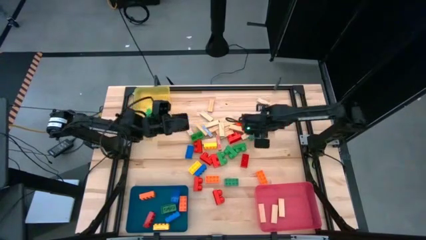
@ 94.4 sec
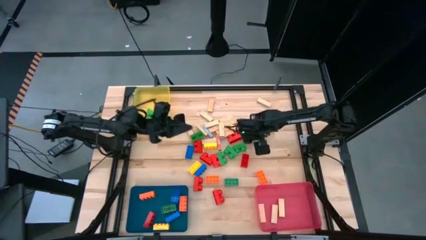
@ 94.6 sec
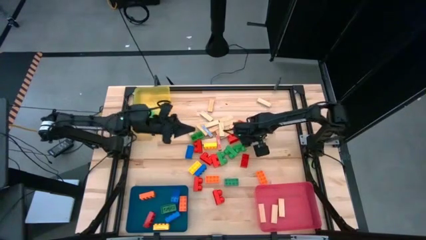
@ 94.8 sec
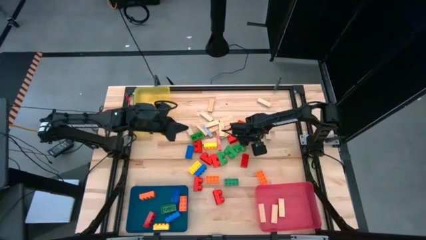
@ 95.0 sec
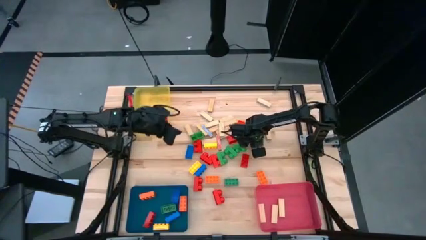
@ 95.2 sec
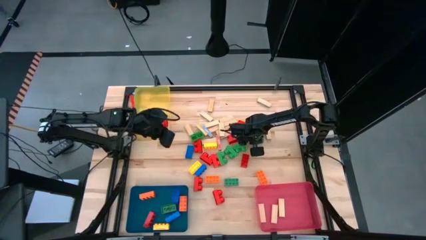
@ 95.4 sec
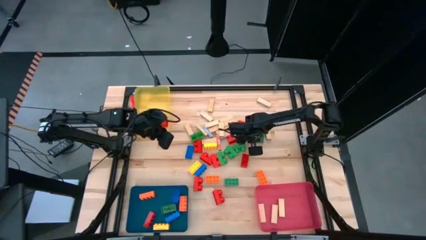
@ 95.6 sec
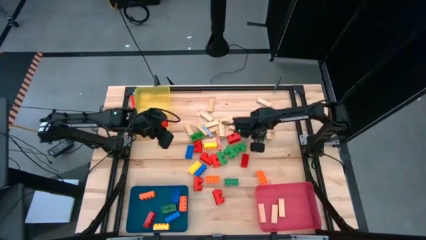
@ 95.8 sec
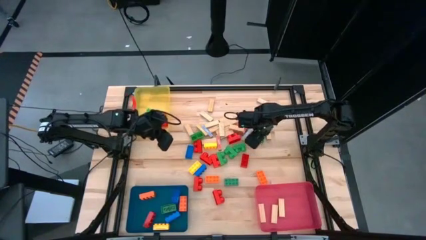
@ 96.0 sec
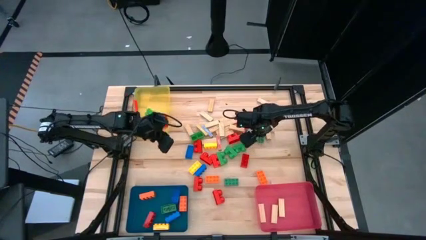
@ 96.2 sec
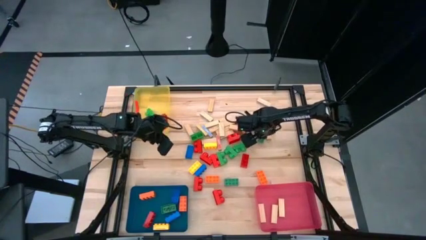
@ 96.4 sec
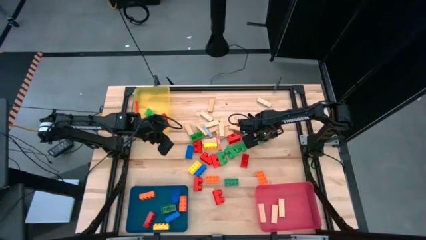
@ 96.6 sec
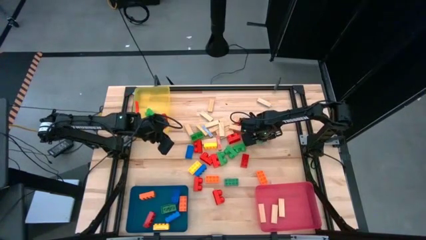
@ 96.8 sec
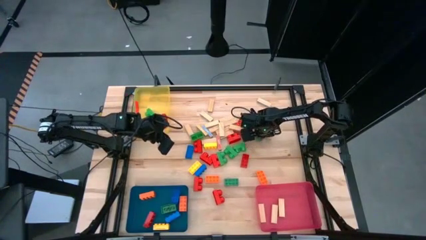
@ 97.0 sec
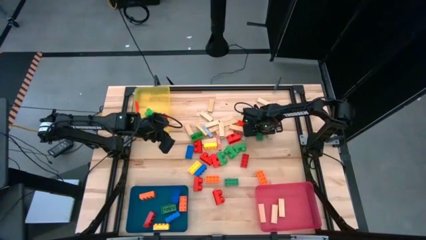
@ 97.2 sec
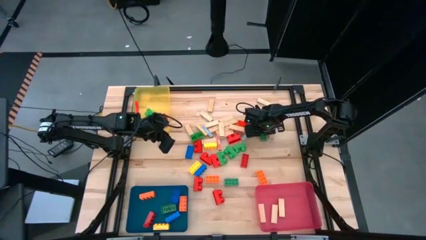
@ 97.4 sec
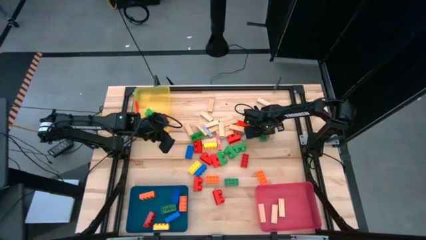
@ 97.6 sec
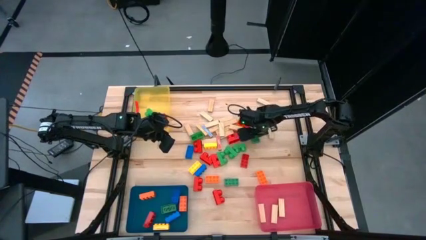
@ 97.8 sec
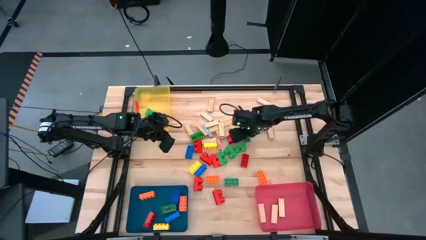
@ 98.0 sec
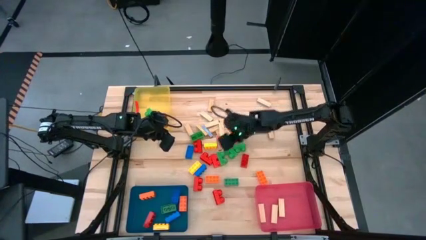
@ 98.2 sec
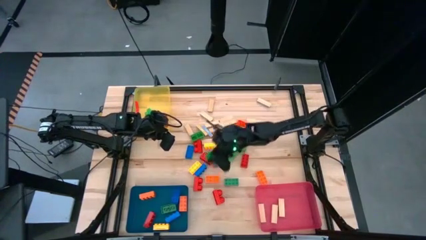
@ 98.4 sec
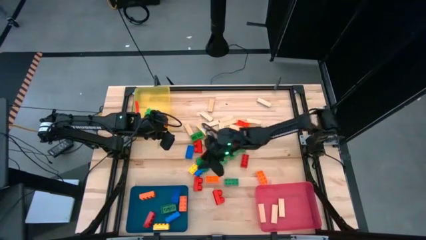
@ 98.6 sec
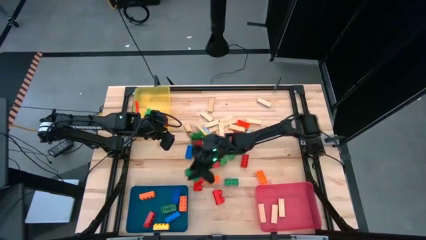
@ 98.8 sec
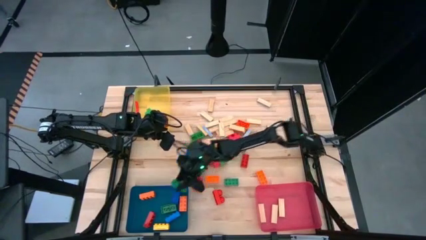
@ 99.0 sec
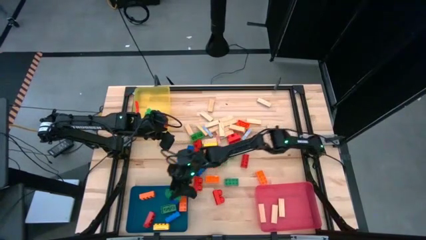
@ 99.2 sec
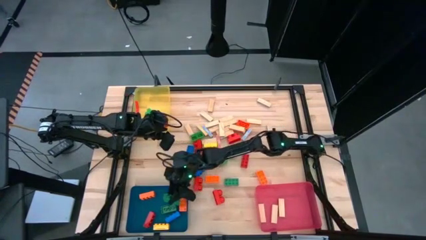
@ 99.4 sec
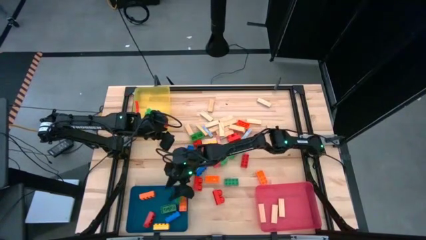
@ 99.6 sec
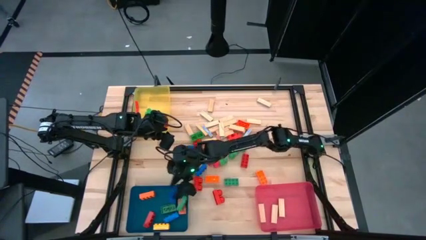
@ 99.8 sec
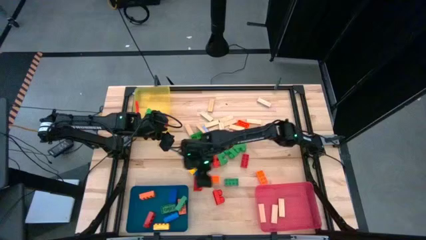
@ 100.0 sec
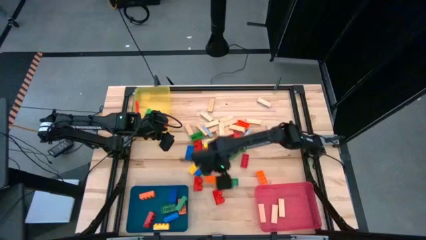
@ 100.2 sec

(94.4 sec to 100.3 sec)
Task: Sort blocks by size
Put the green game piece into the blue bin

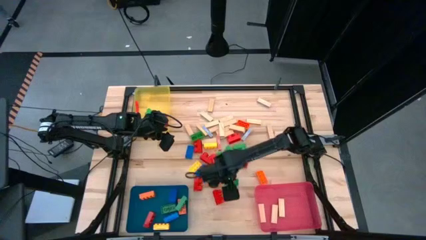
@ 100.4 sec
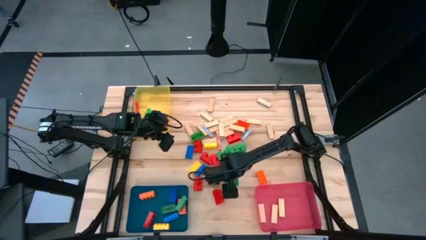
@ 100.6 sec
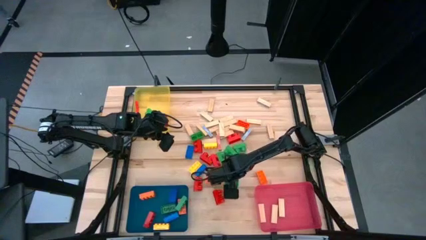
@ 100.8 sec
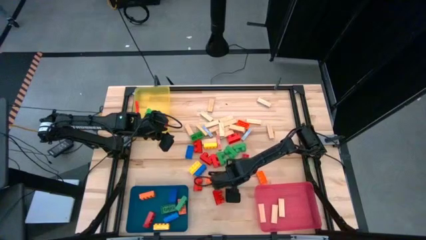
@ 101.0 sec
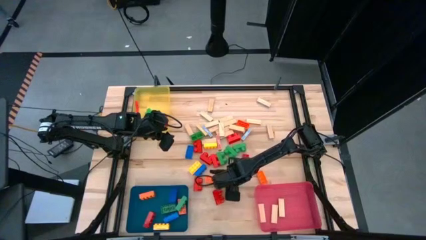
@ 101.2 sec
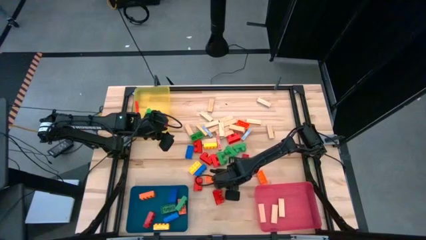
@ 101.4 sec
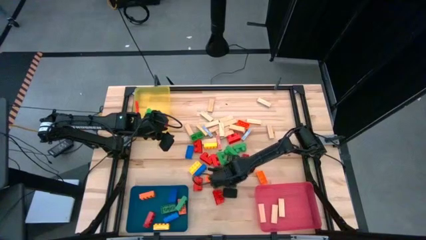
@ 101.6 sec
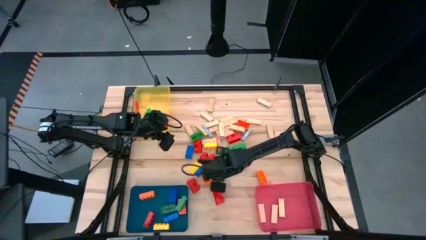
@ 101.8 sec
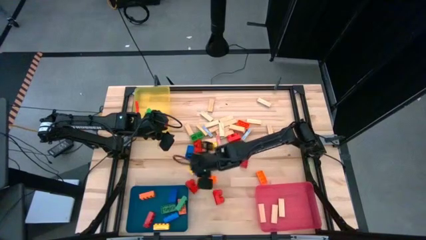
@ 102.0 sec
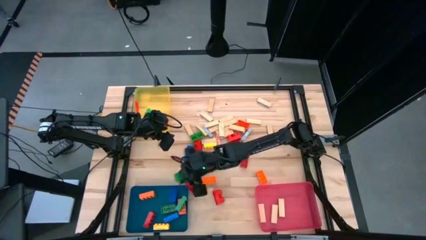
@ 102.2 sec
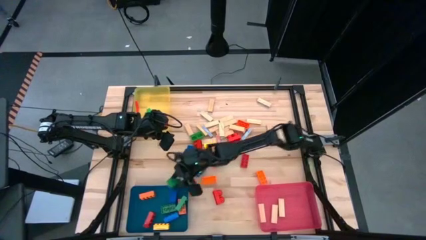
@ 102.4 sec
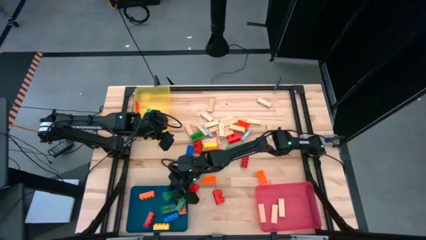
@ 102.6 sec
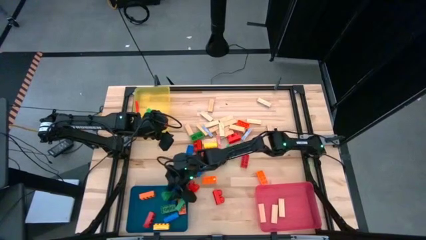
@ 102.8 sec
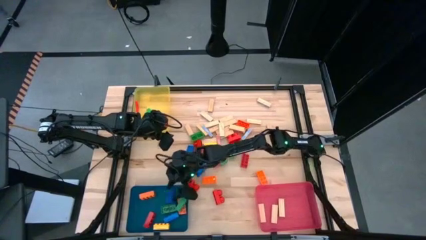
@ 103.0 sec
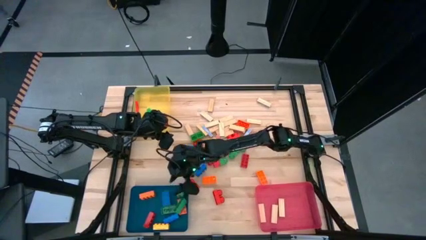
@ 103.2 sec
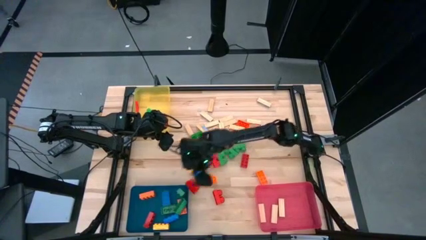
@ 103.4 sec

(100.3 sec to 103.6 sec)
Put the green game piece into the blue bin

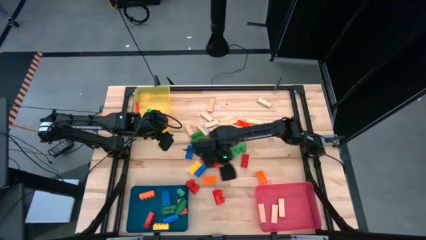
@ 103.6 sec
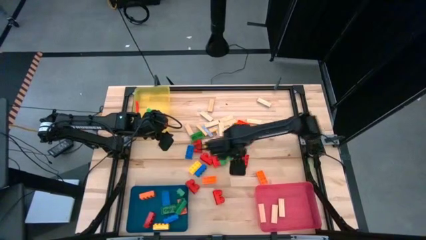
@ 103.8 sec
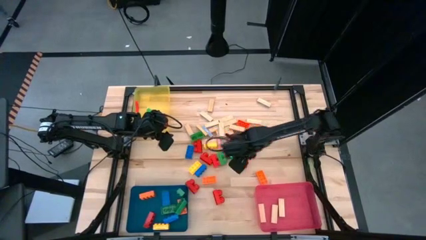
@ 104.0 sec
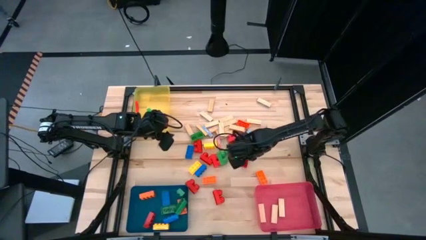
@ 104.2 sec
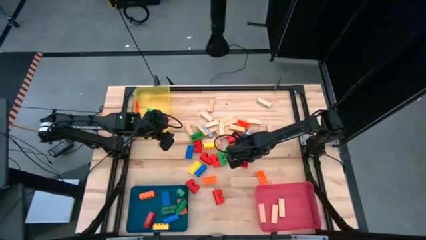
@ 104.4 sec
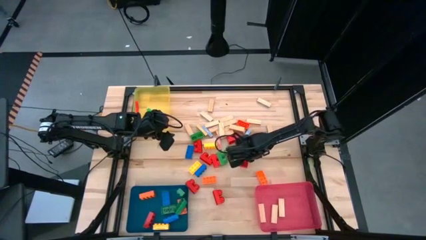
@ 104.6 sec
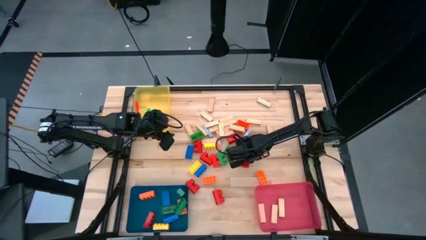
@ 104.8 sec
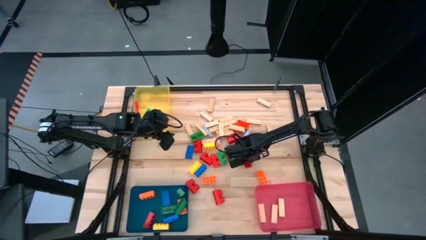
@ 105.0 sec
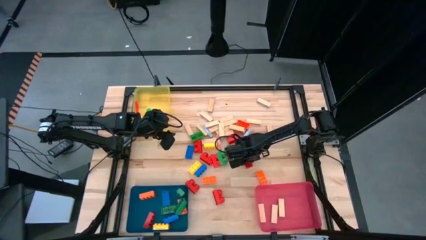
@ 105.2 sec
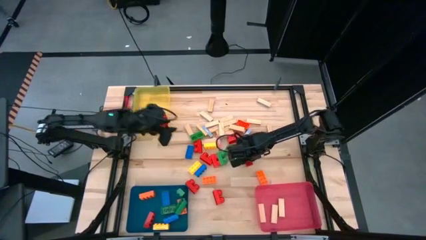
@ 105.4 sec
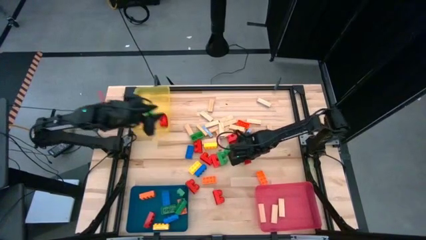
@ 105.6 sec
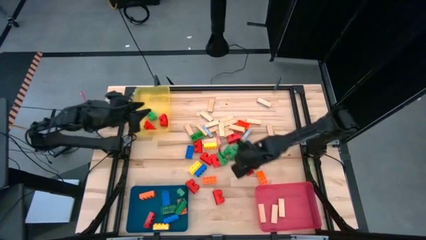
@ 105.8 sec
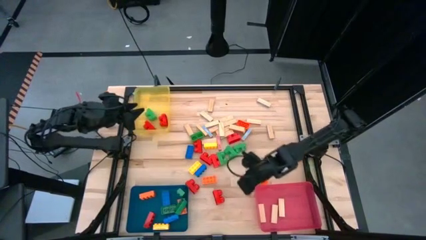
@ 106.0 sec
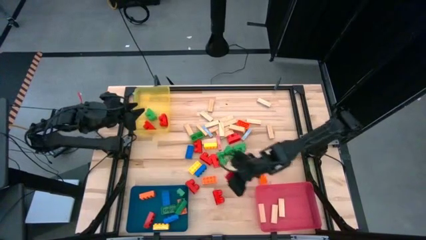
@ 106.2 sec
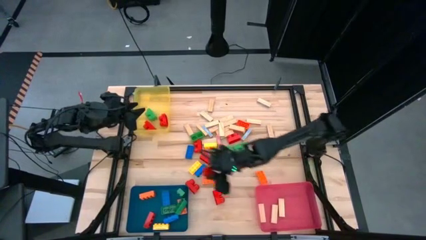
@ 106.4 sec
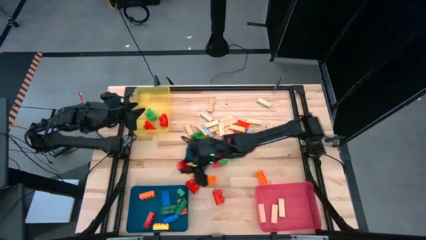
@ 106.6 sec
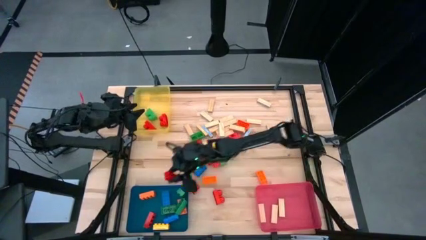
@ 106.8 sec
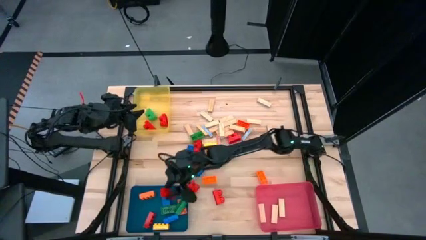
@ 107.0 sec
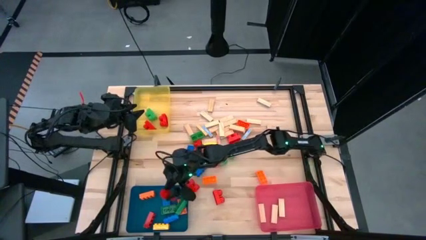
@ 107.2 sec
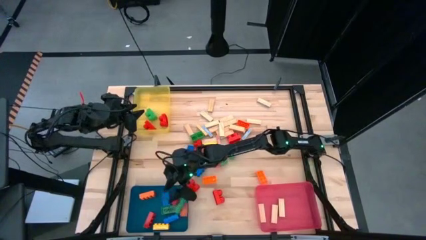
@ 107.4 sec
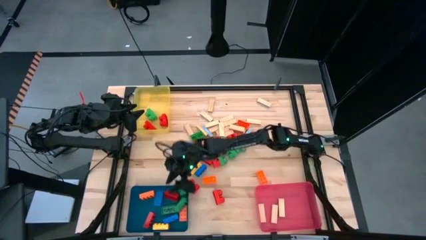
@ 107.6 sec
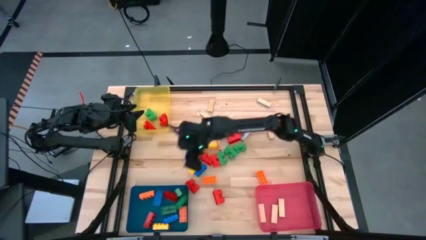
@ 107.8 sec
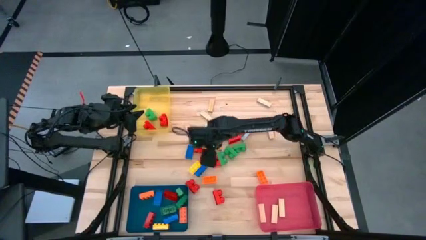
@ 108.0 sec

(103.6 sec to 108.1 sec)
Put the red game piece into the blue bin

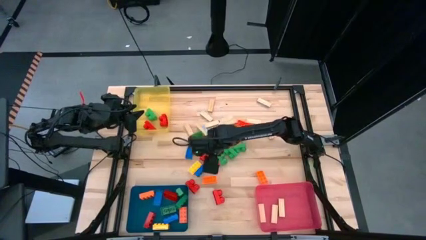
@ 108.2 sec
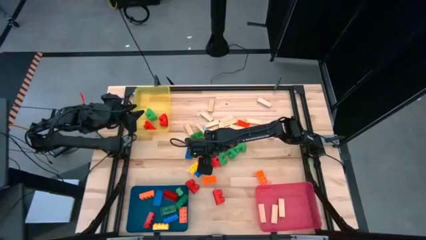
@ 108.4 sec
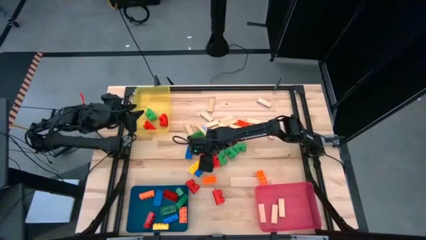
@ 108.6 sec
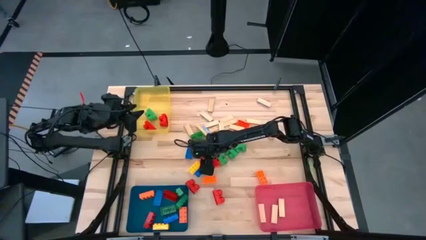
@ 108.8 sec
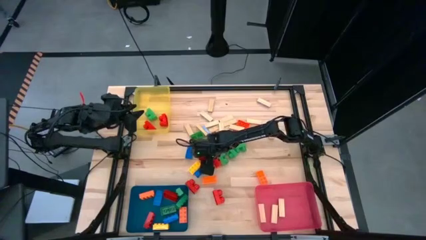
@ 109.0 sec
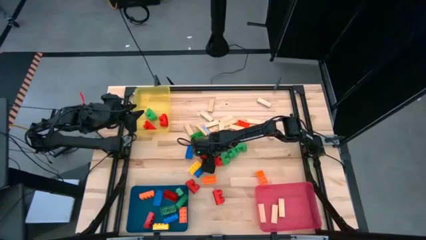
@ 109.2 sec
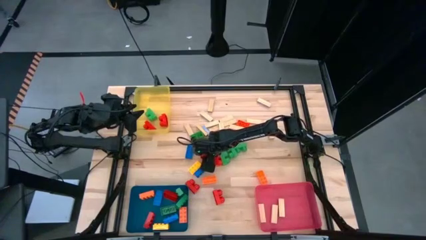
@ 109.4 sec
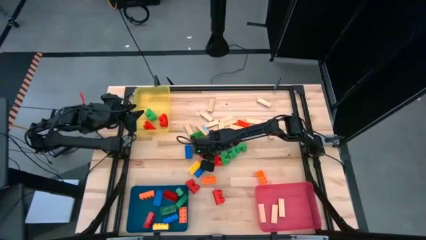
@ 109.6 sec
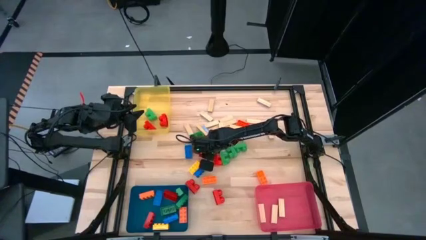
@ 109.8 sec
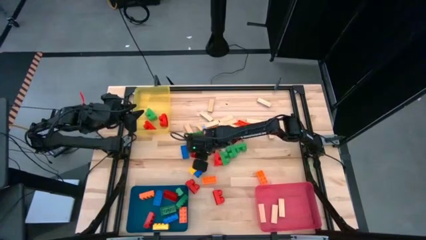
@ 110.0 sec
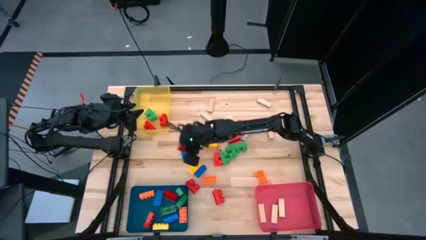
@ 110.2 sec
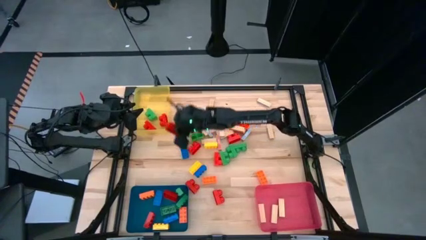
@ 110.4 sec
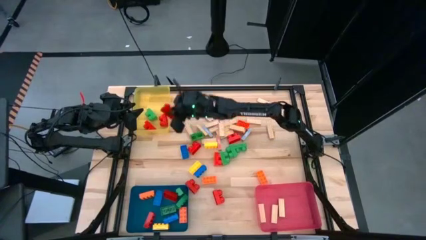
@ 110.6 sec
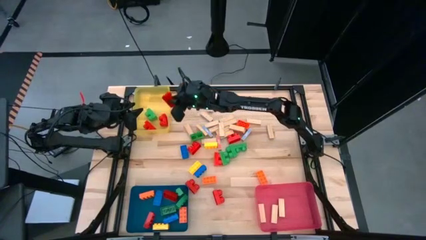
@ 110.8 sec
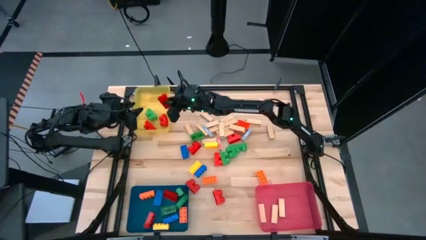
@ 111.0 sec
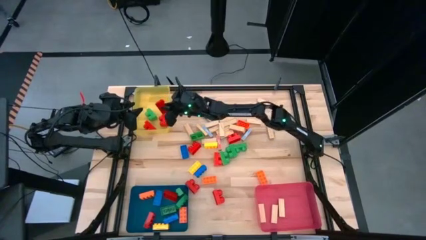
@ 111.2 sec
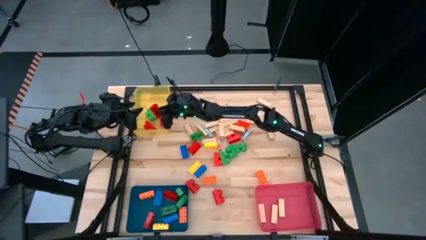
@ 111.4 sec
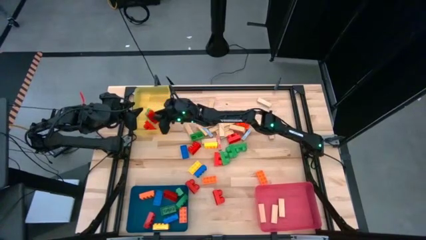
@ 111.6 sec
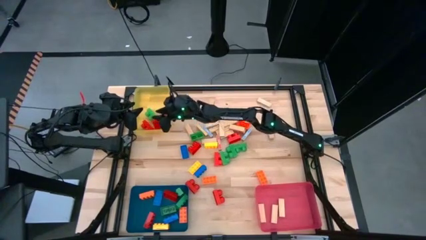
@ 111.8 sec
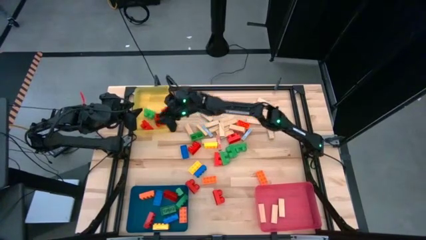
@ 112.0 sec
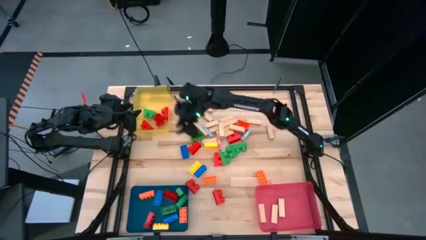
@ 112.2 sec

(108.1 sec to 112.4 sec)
Put the round red game piece into the yellow bin
